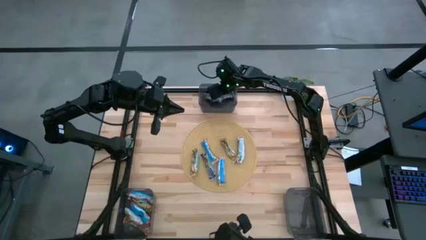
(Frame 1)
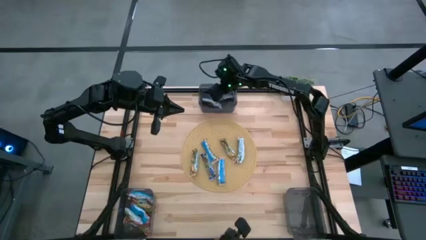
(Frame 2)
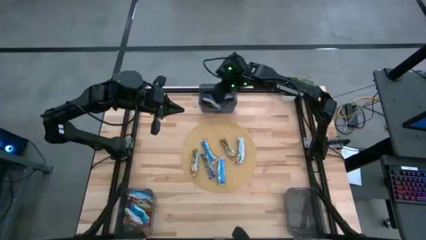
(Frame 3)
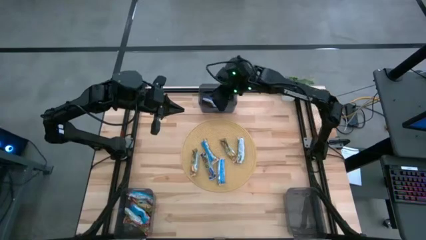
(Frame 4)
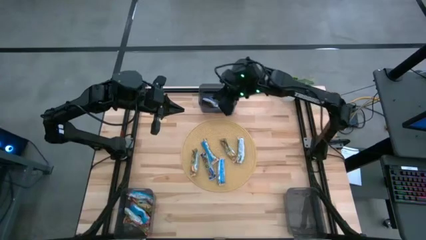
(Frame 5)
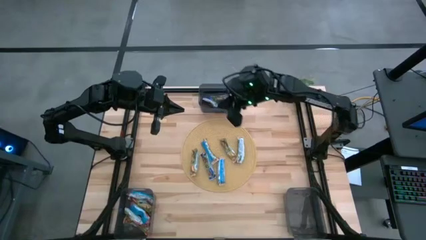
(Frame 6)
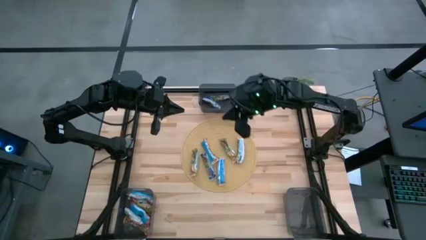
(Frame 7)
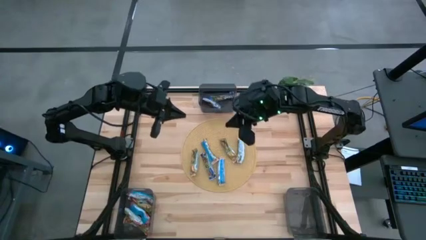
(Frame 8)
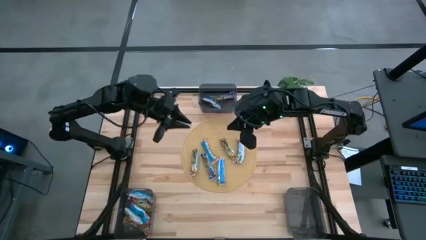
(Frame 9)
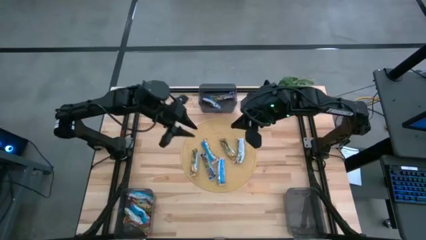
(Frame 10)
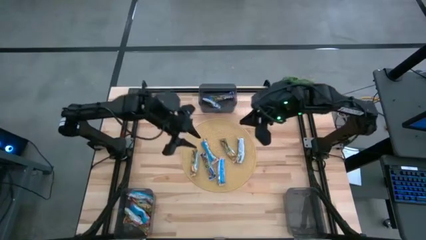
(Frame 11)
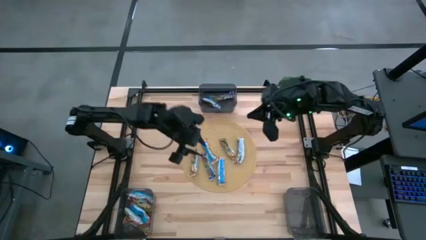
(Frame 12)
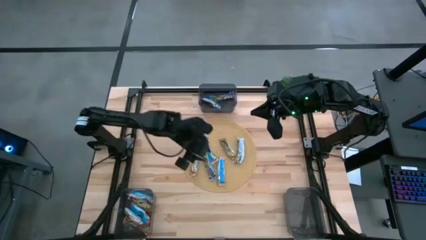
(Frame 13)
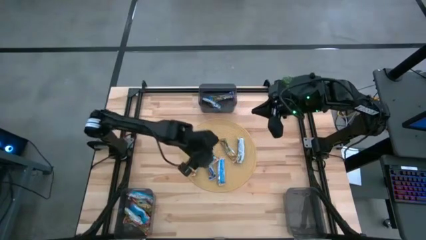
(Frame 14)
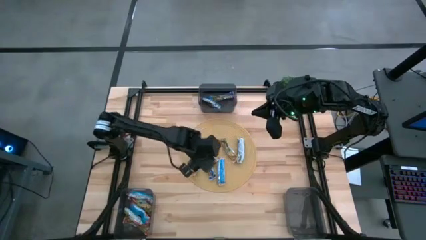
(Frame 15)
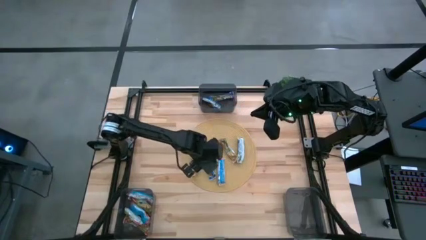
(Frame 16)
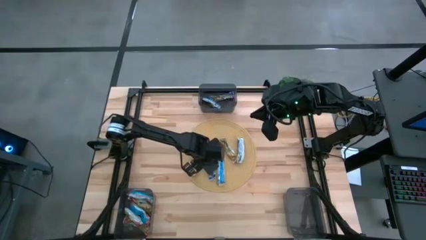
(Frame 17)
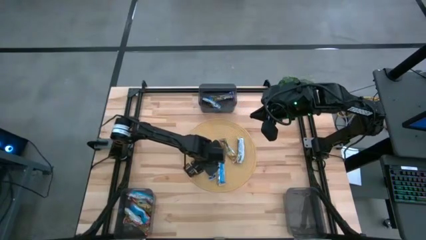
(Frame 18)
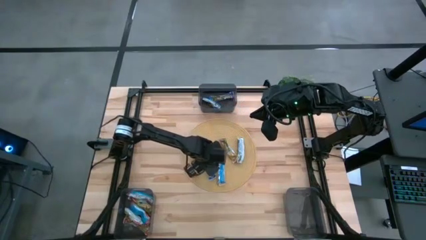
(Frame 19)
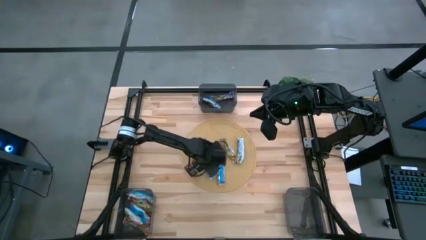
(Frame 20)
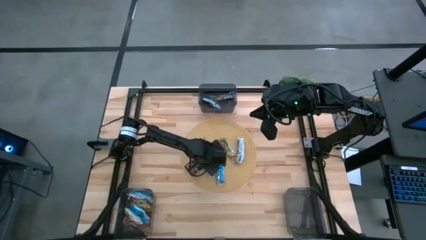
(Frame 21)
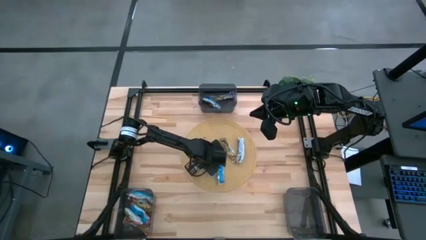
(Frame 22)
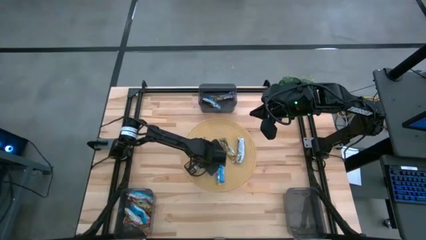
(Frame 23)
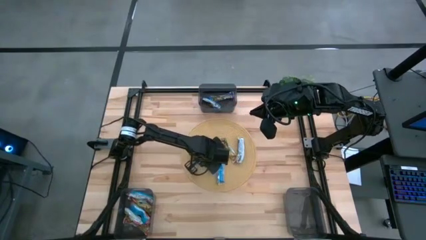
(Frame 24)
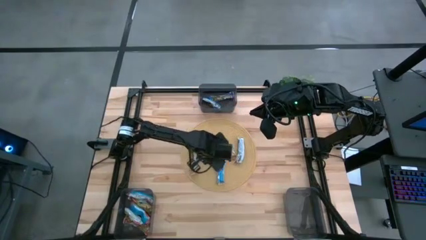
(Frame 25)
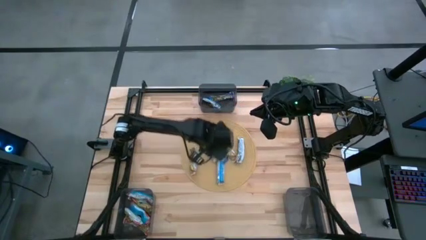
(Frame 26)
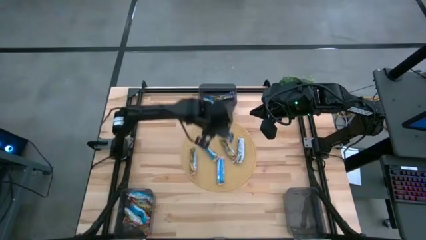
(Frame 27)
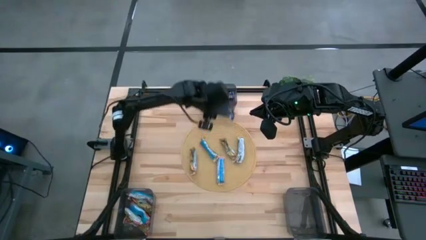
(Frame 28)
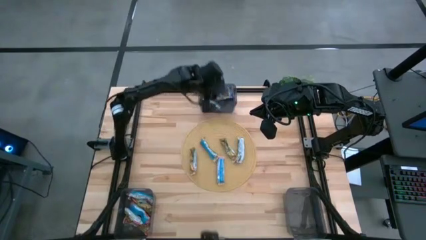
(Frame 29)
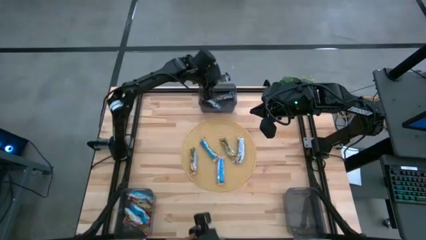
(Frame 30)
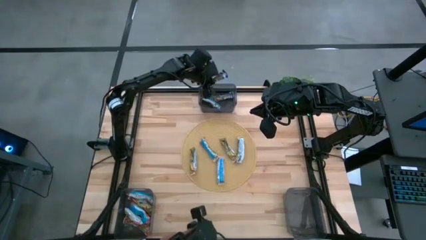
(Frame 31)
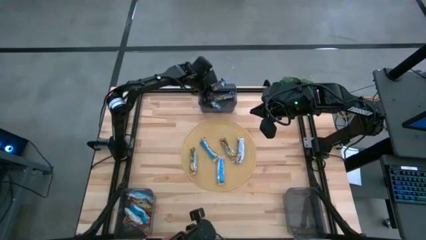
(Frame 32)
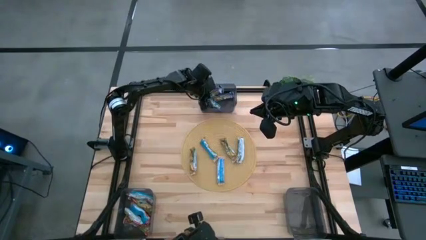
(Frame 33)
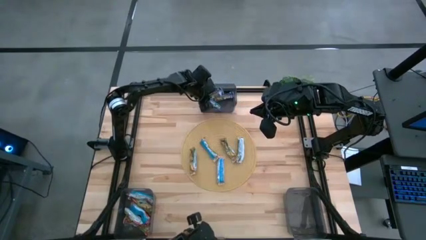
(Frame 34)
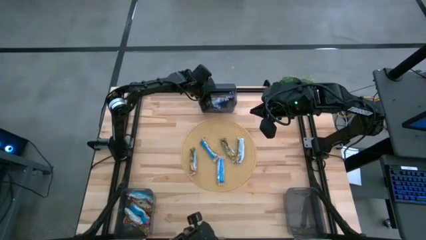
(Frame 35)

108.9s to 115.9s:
Task: Pick and place Granola Bars by type
Put the blue granola bar into the top black bin

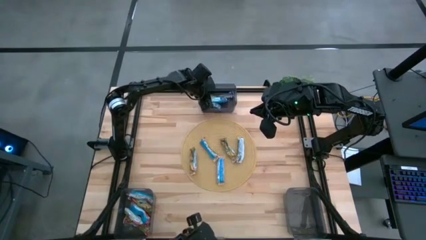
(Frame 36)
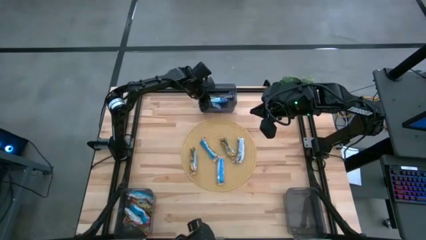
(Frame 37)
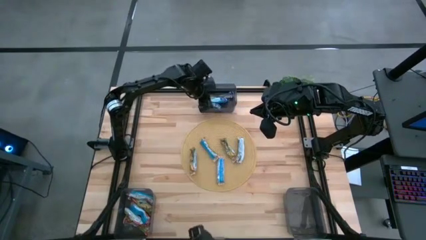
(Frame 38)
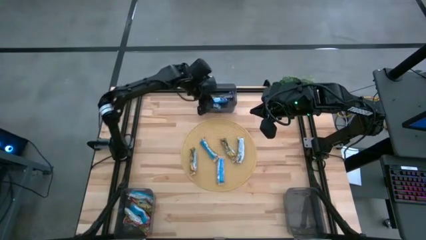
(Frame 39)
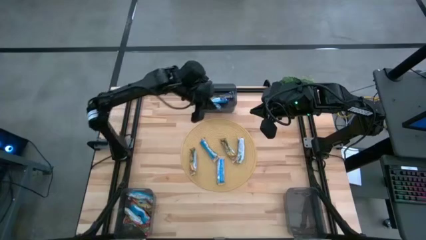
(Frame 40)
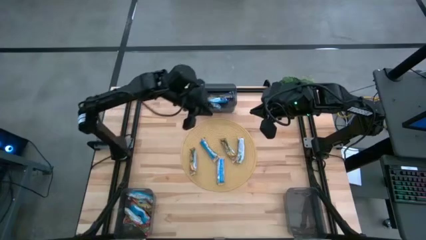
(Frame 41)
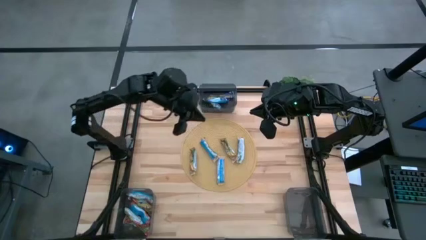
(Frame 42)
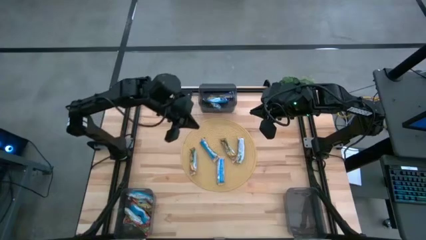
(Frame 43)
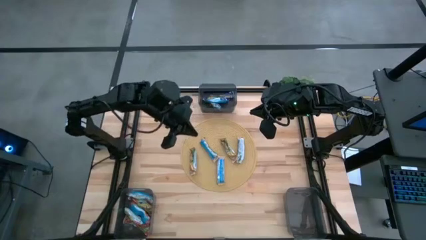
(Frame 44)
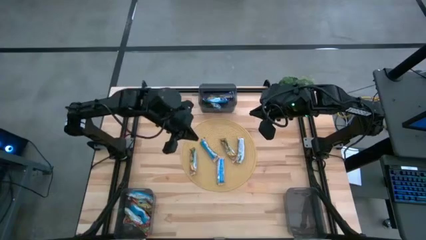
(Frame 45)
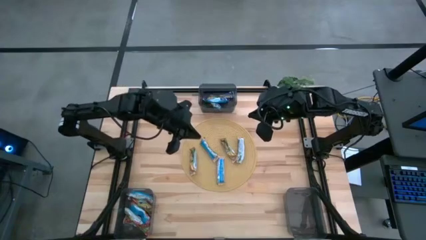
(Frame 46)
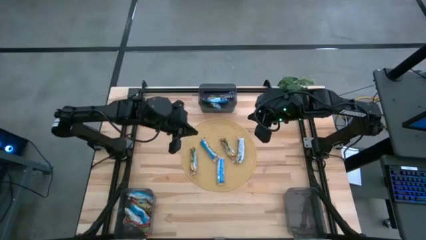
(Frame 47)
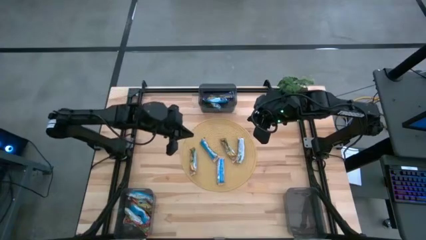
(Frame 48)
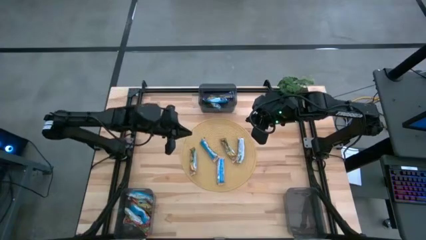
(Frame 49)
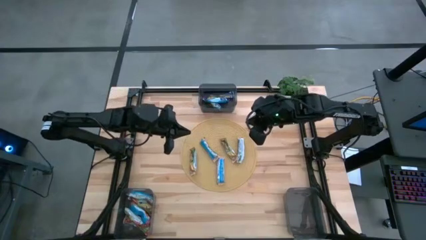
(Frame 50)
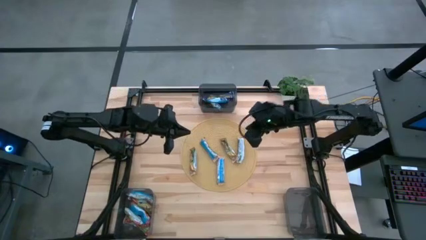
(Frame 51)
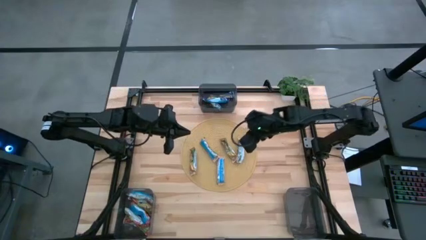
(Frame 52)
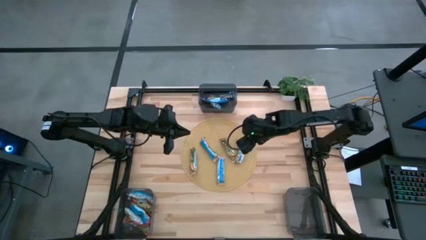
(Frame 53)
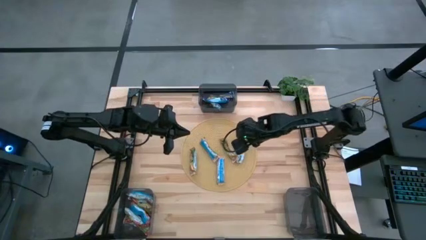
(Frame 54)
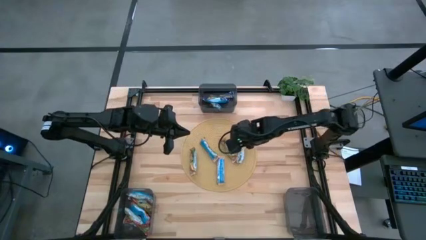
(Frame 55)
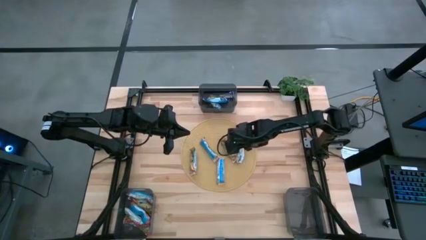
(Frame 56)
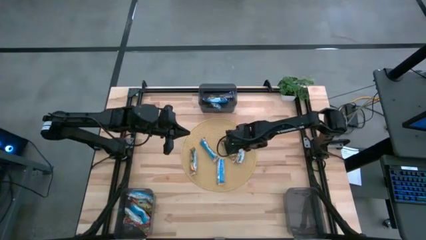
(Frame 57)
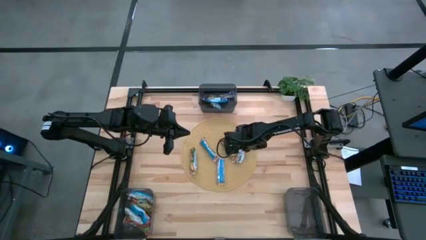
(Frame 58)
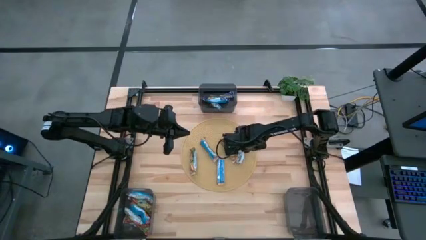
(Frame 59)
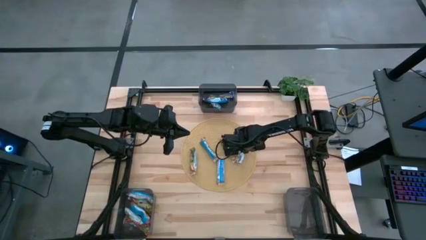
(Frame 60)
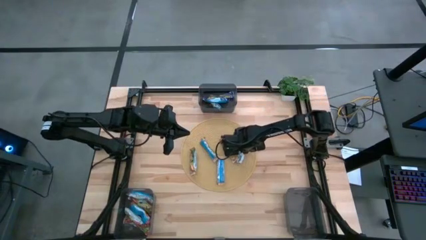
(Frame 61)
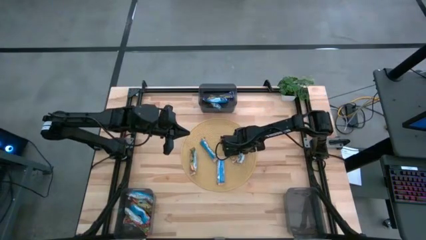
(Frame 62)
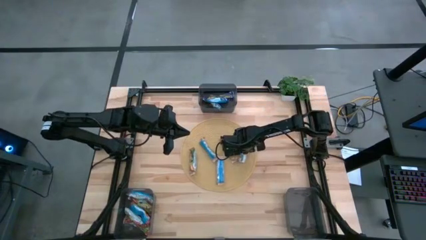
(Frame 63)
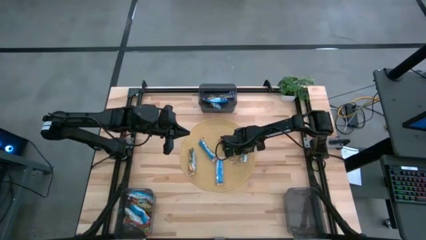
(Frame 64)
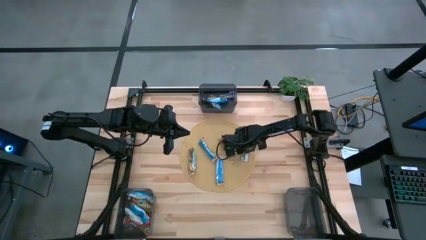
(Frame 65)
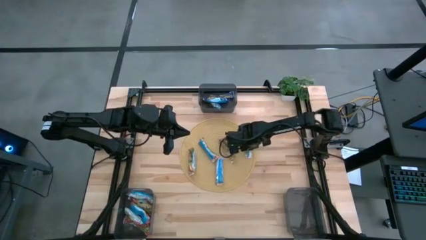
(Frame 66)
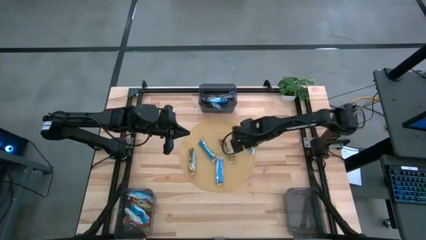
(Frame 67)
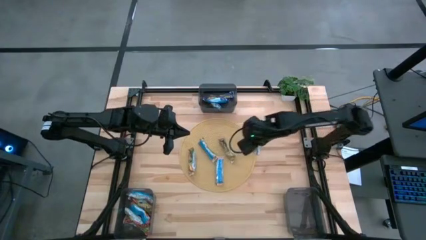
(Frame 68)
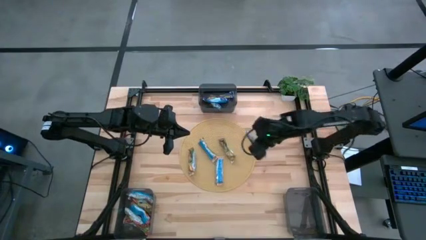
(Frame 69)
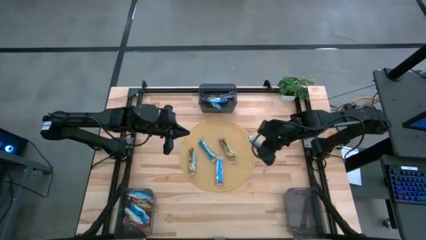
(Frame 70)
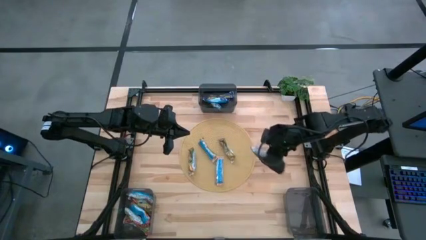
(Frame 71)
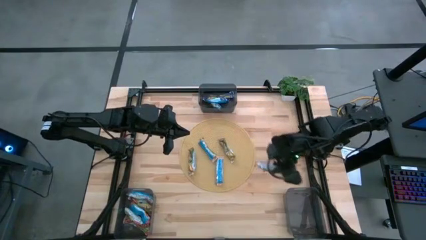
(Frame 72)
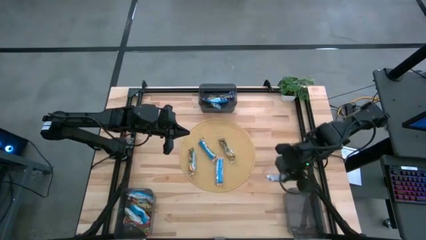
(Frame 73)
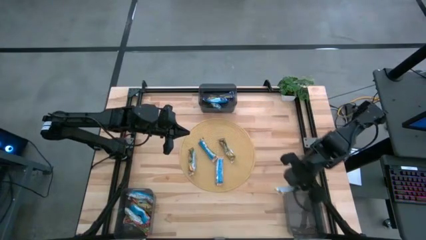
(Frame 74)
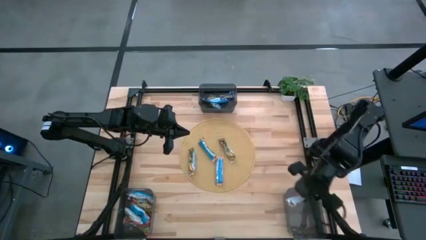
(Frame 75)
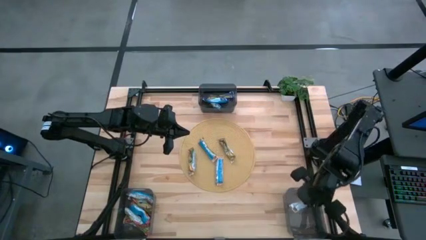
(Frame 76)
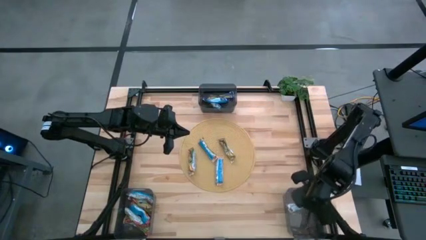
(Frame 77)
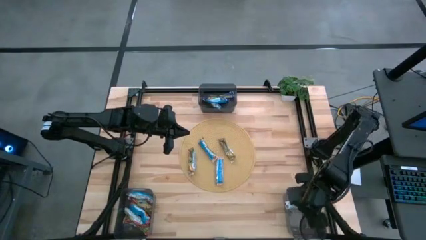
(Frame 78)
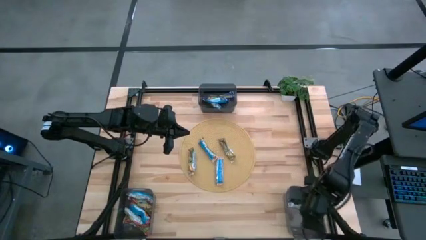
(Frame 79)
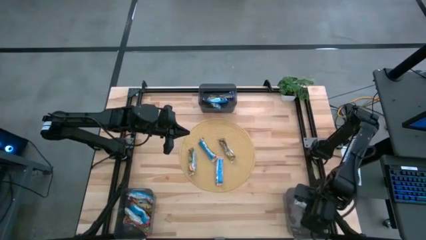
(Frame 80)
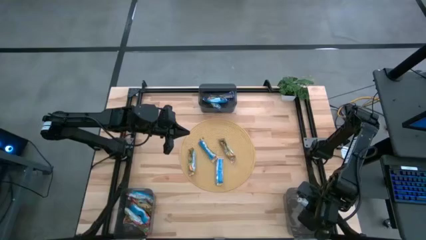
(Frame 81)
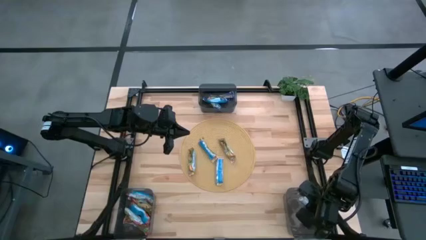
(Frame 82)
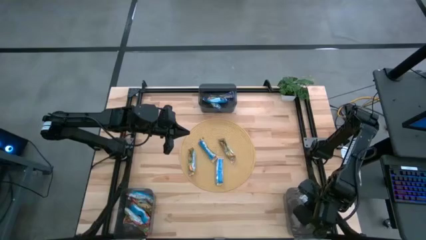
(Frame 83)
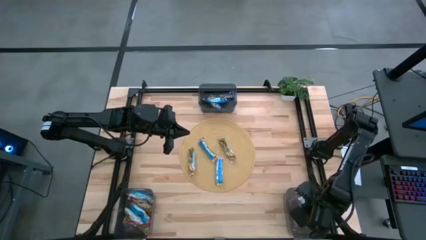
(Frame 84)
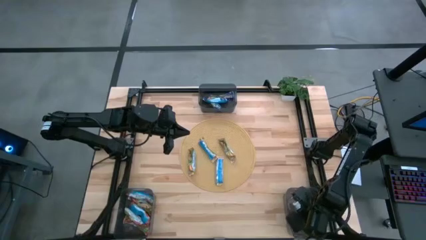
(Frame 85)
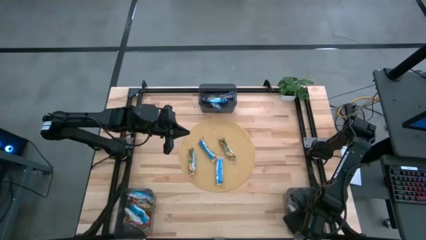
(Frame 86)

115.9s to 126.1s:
Put the yellow granola bar into the right black bin
